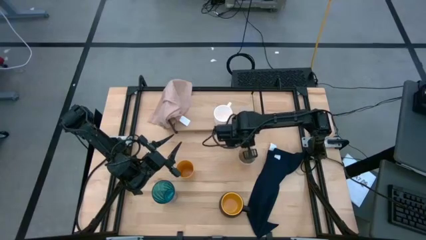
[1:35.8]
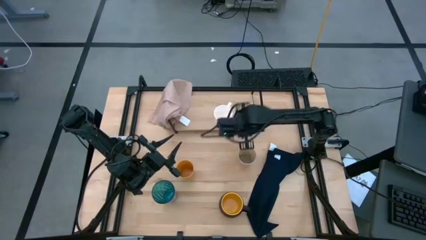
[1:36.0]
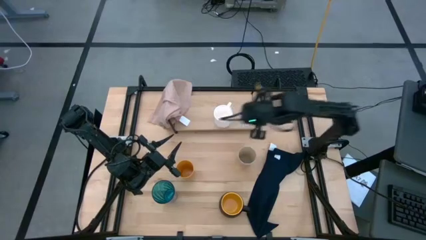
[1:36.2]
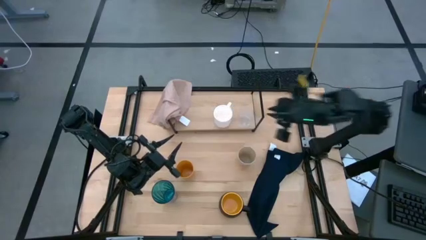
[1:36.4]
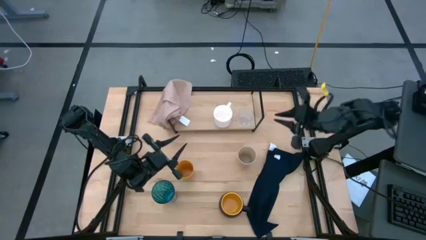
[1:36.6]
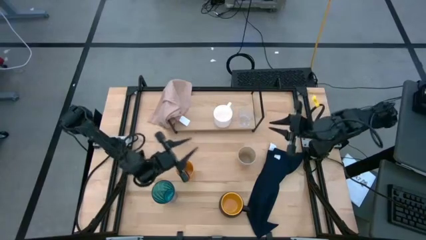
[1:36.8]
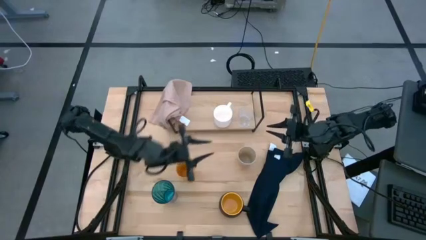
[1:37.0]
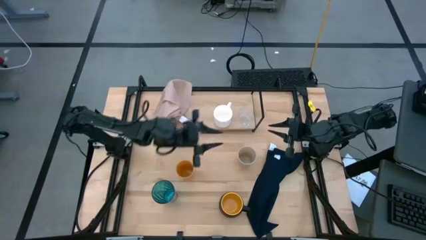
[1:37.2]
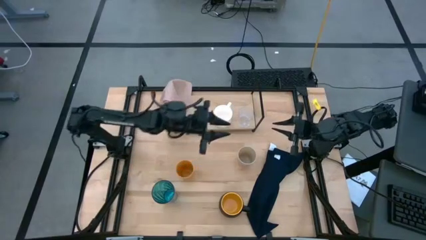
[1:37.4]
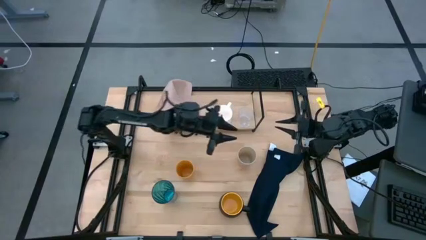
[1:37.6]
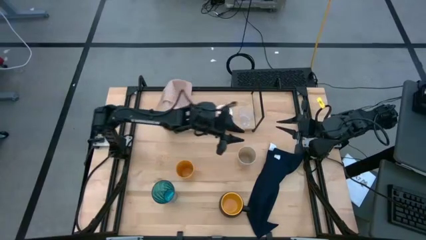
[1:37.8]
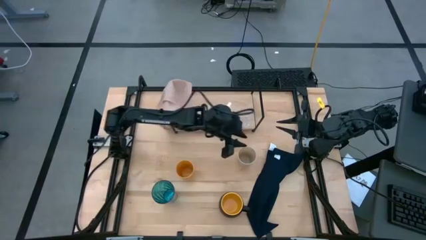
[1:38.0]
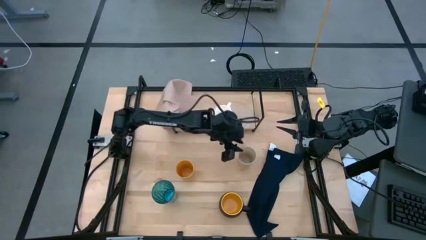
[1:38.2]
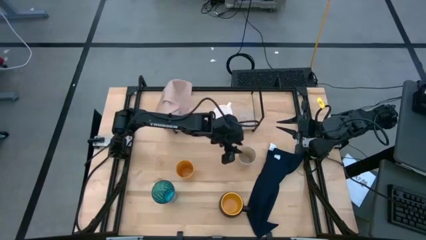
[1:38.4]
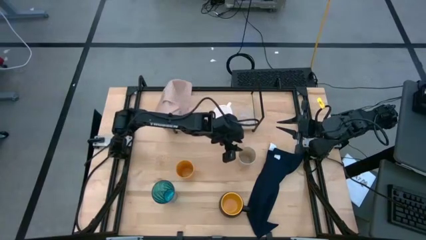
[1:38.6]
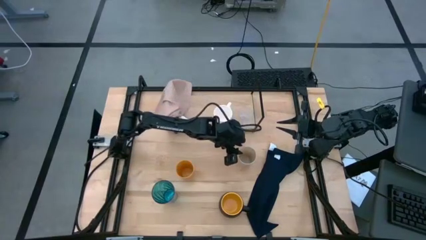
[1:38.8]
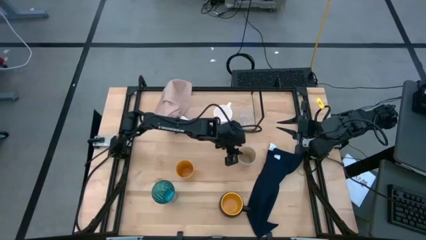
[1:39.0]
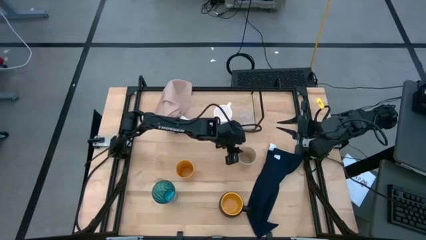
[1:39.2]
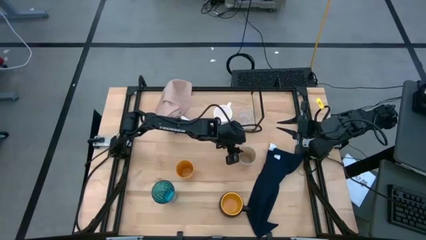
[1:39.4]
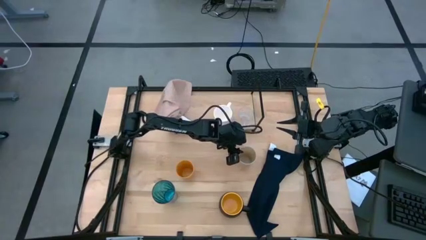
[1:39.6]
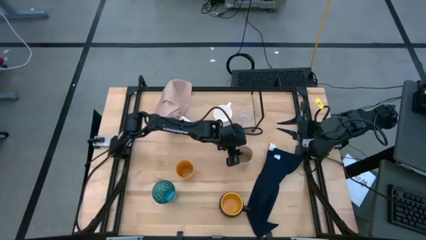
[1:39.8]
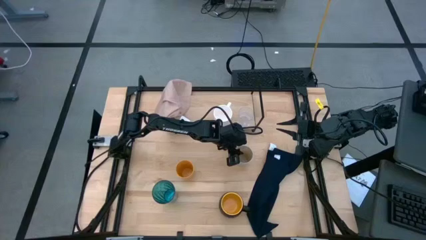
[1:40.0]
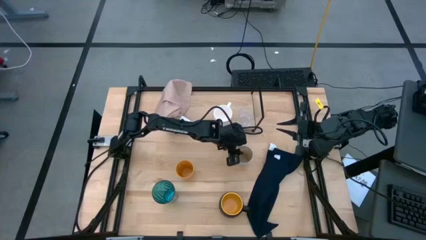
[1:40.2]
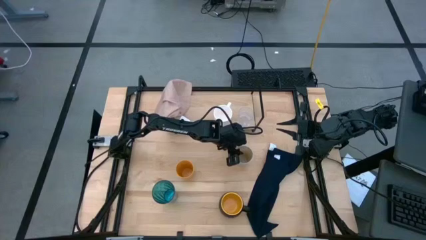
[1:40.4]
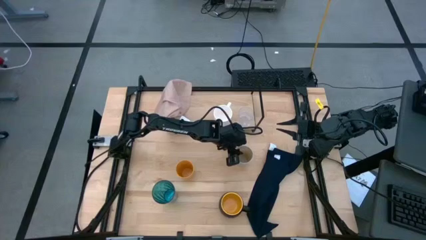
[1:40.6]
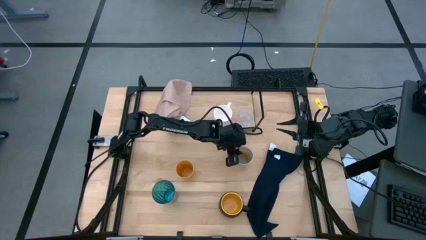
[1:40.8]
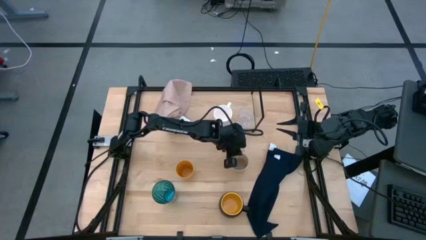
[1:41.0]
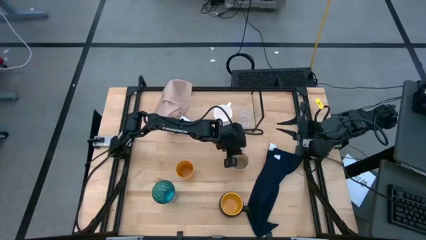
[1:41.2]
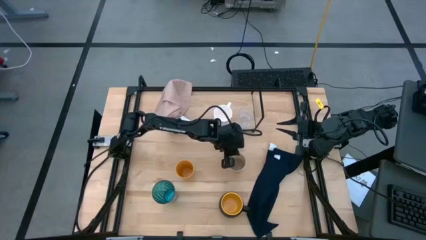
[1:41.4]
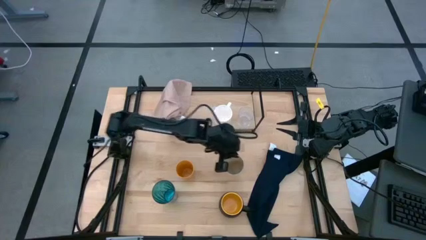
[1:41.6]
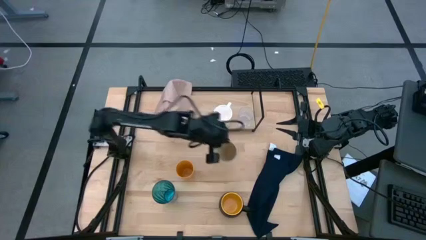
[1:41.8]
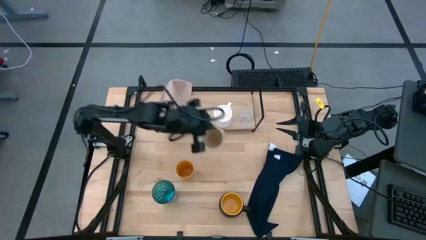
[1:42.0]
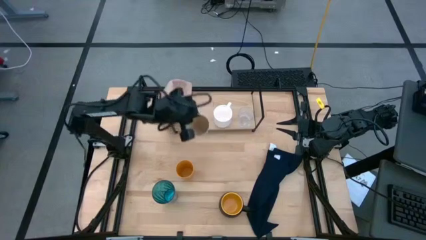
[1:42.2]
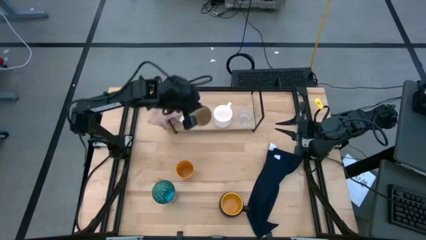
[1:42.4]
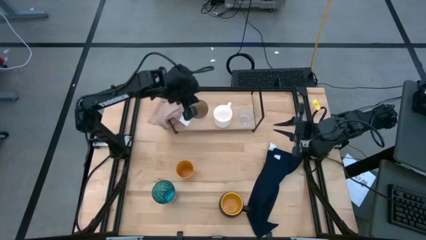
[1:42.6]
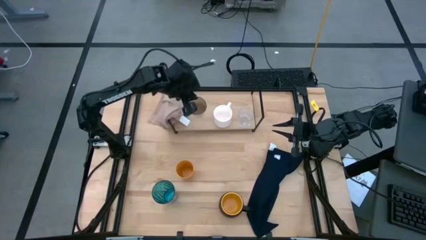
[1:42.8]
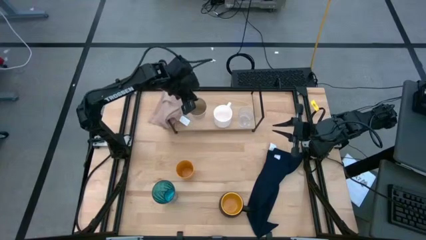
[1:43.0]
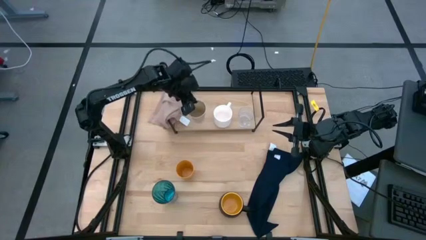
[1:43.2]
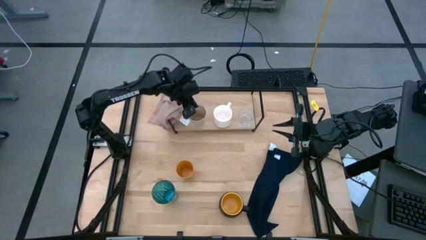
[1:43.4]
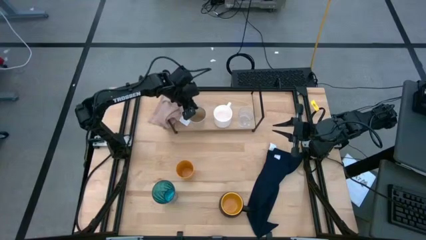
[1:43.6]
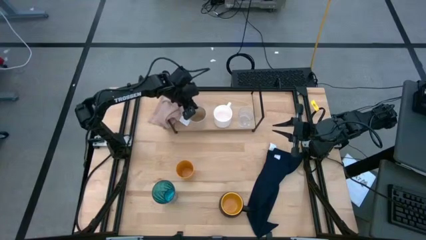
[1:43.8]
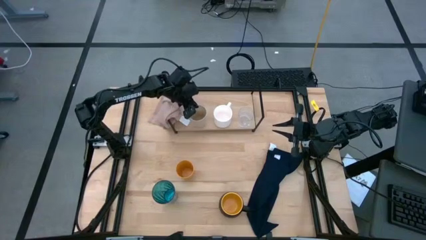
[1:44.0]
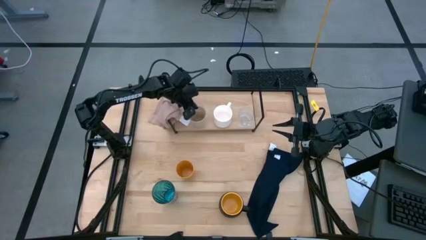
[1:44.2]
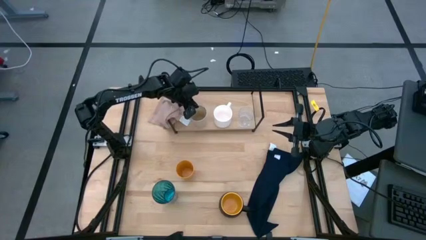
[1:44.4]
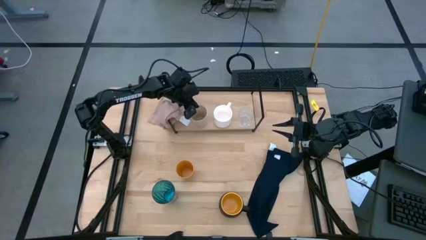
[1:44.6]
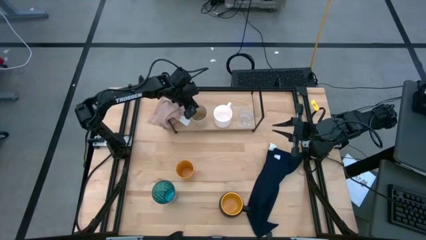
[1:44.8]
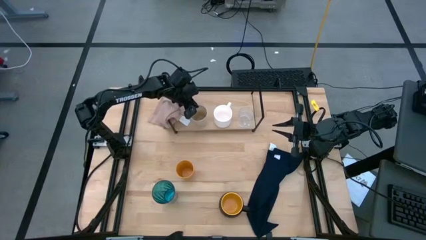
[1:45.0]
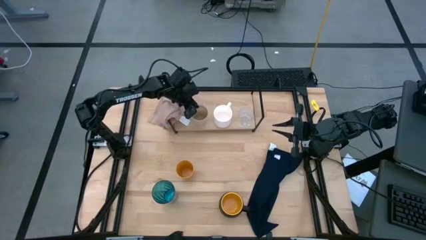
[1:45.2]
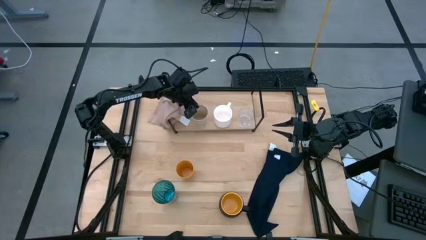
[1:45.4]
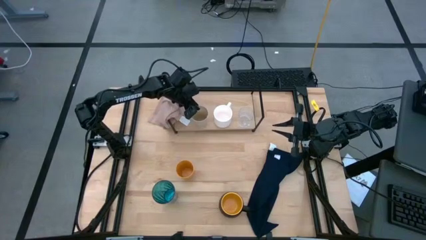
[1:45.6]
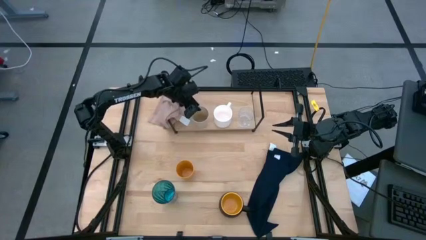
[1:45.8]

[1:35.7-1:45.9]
Task: Stack small to large cups/mugs on shelf
Put the light brown cup on the shelf

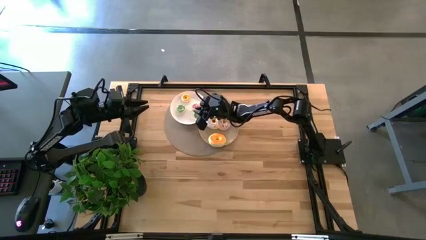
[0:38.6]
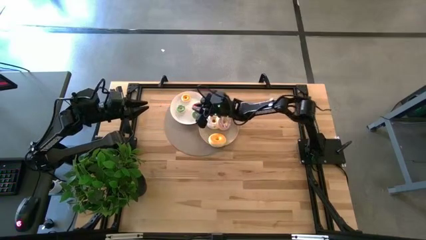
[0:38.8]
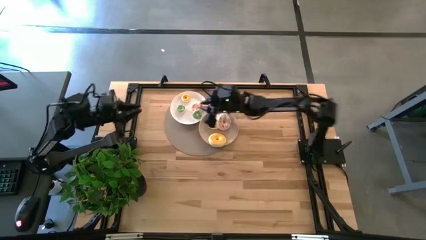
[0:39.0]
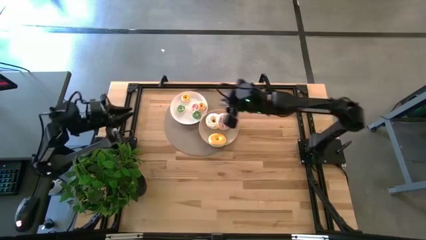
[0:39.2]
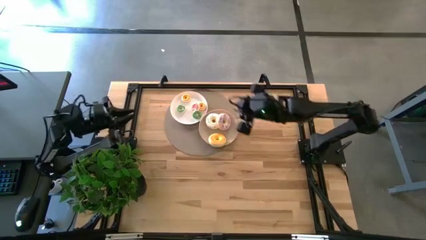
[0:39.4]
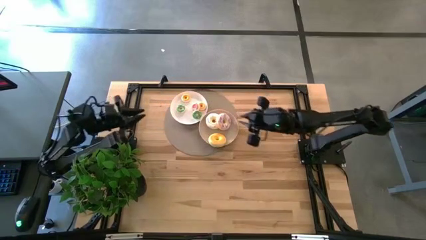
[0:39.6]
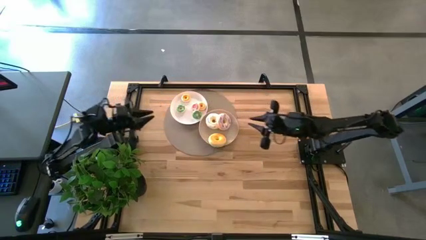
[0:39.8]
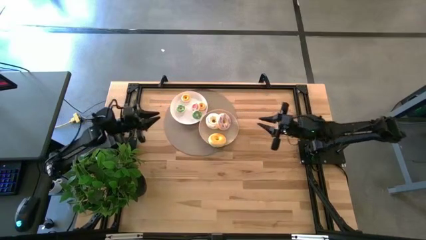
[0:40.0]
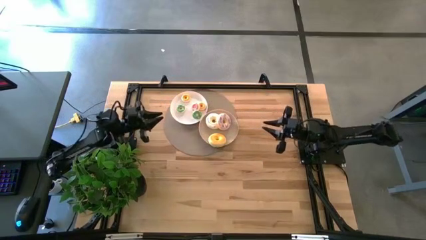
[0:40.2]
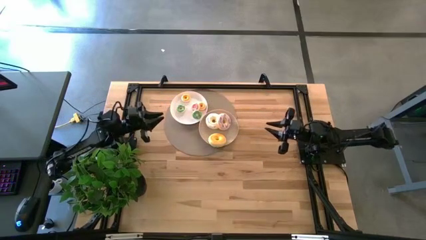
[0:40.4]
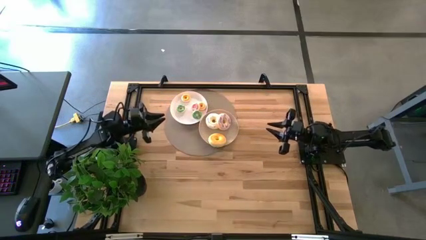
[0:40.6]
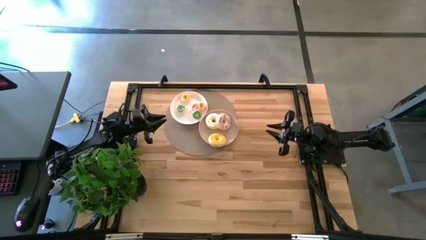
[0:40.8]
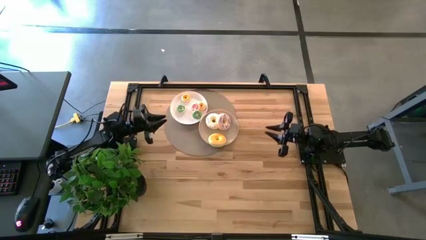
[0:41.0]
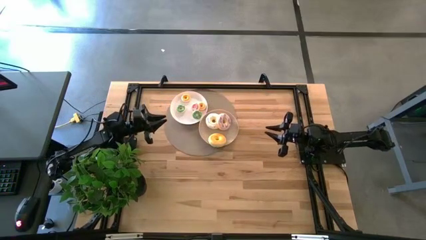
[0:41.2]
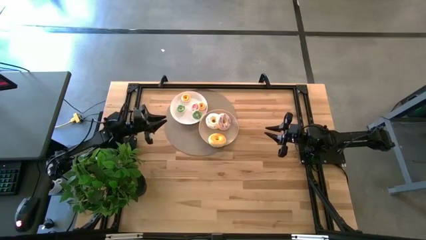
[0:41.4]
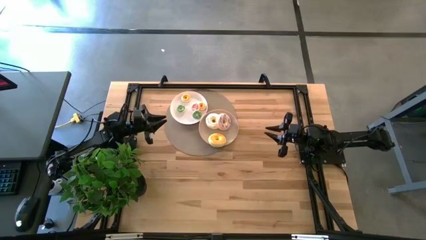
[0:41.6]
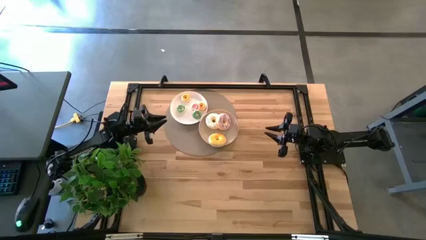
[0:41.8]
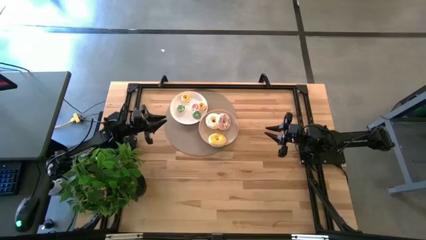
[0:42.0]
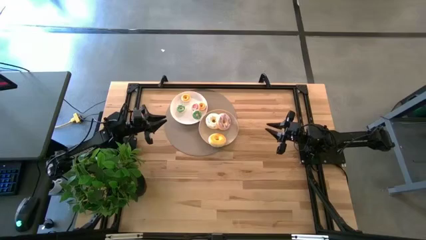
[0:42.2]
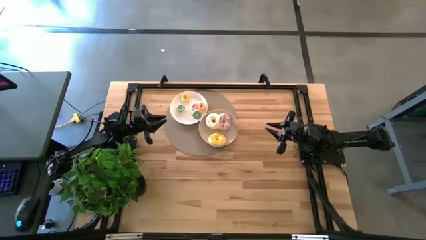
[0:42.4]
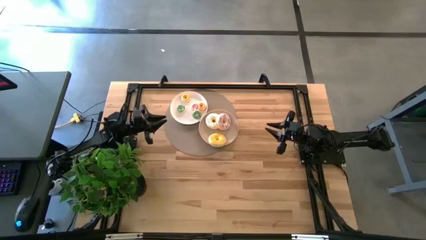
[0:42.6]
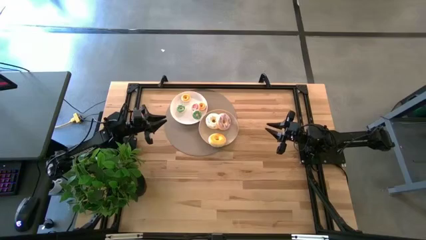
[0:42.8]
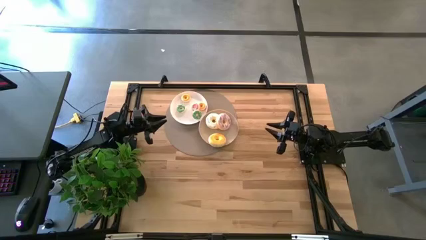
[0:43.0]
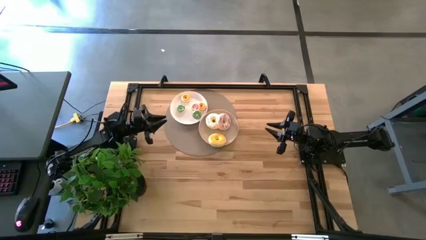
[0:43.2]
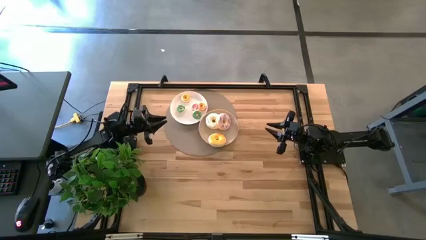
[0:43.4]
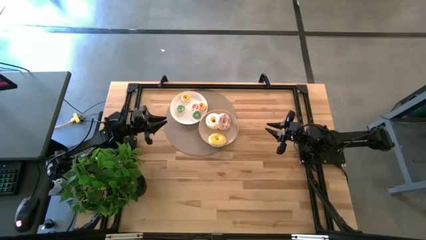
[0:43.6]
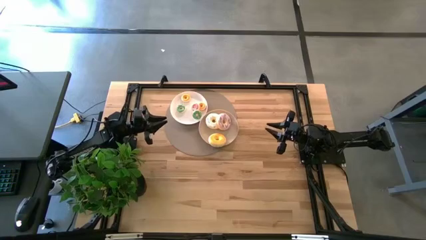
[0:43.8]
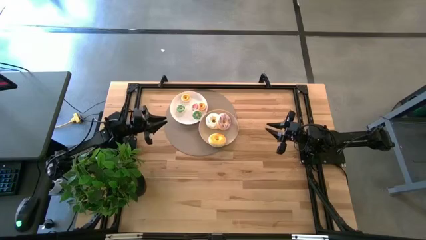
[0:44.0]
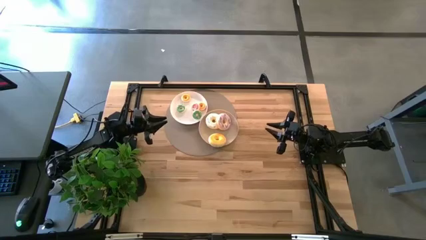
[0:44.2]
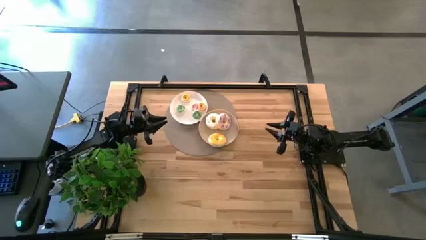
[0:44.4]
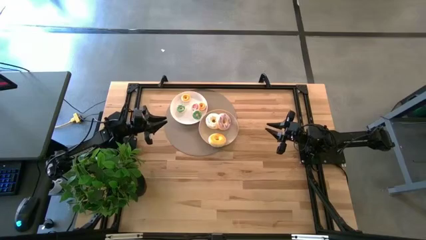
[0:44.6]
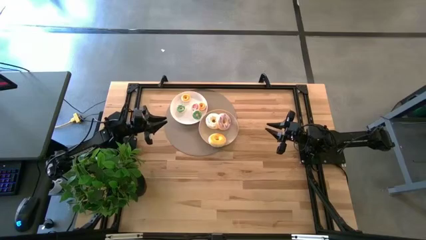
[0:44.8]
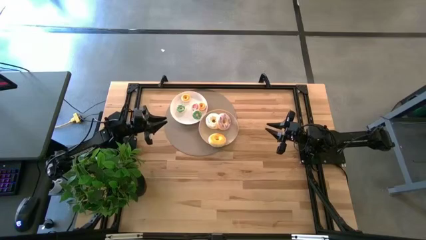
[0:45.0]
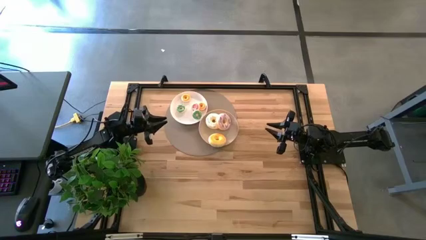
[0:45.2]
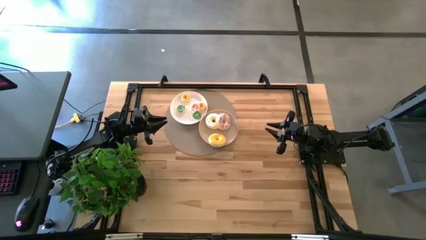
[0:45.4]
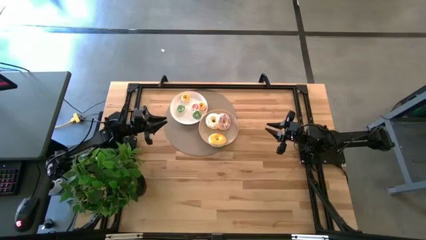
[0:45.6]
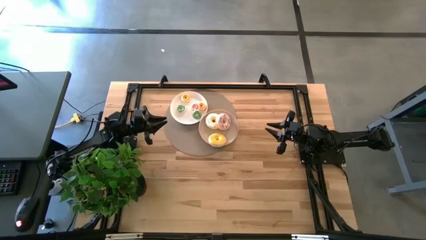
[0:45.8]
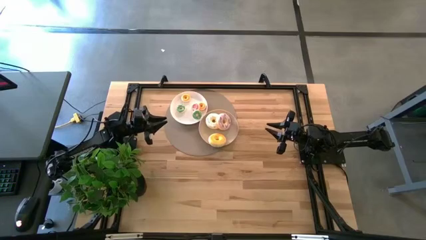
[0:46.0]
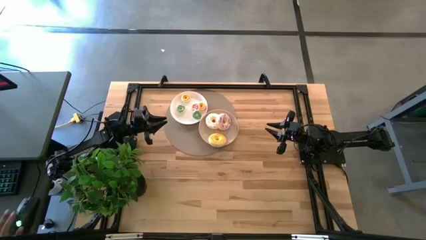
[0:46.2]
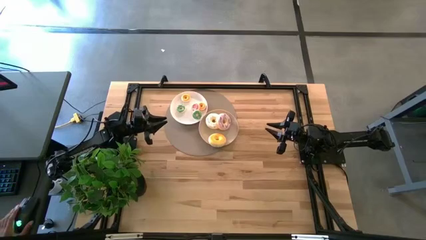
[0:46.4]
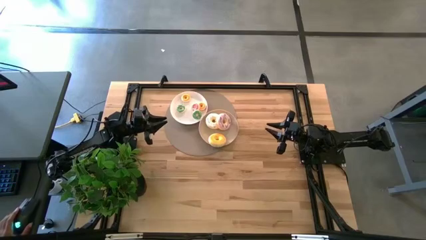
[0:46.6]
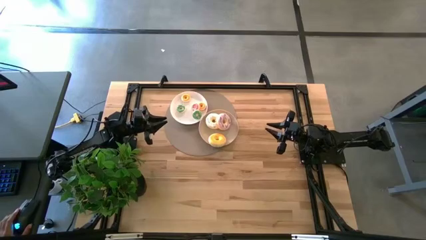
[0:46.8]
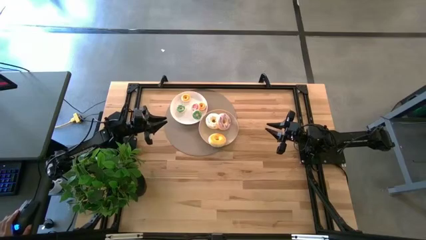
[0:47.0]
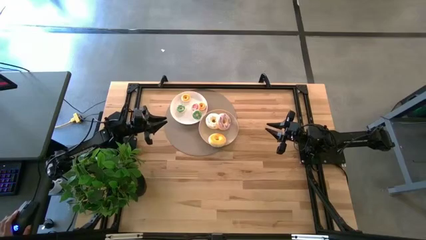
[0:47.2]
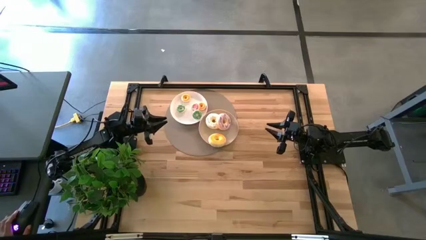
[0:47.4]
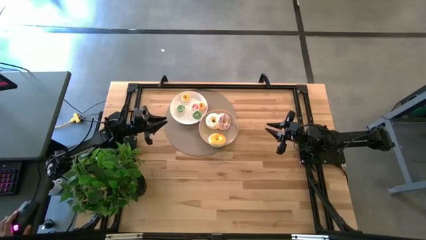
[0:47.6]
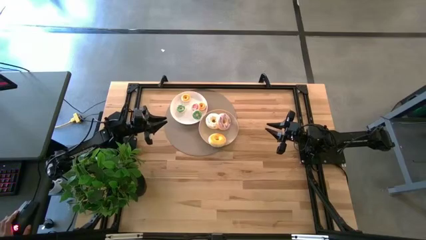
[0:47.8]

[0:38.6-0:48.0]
Task: Pick & Place donuts
Return to Home Position
